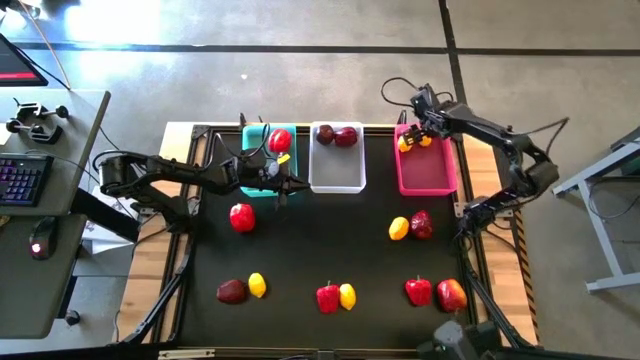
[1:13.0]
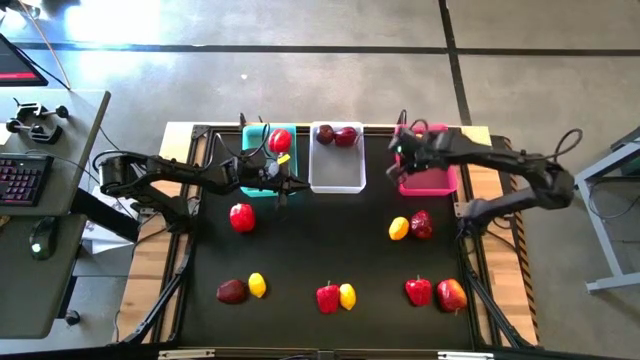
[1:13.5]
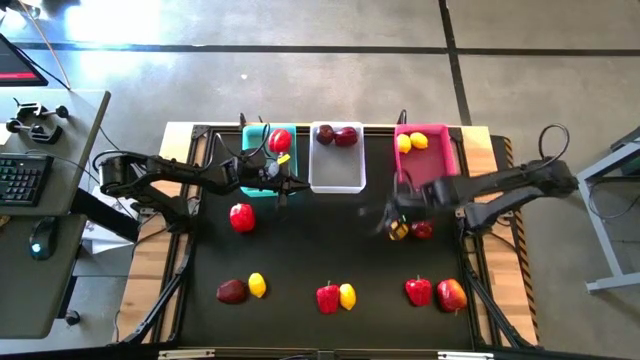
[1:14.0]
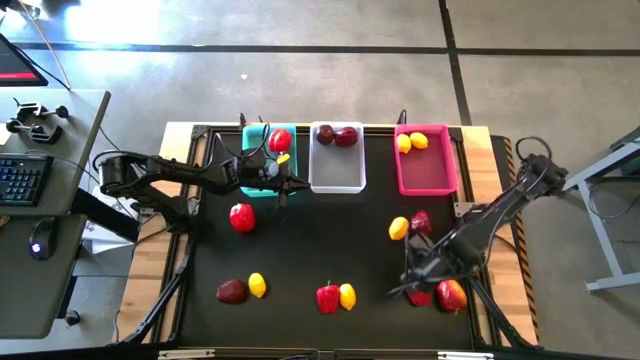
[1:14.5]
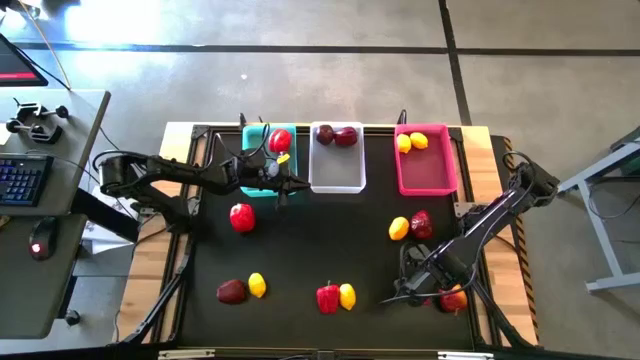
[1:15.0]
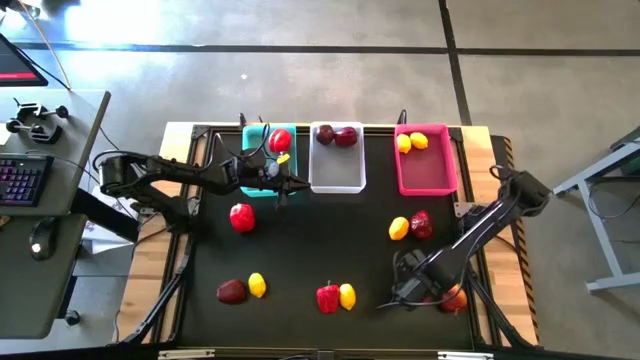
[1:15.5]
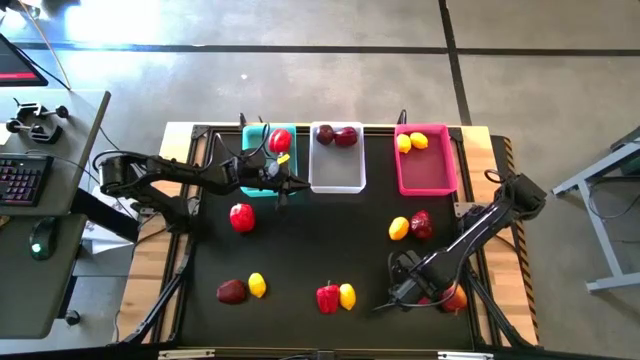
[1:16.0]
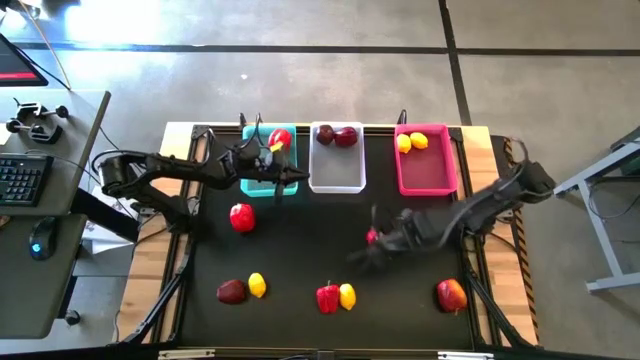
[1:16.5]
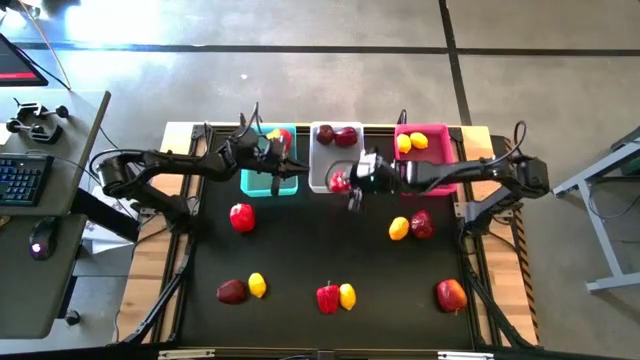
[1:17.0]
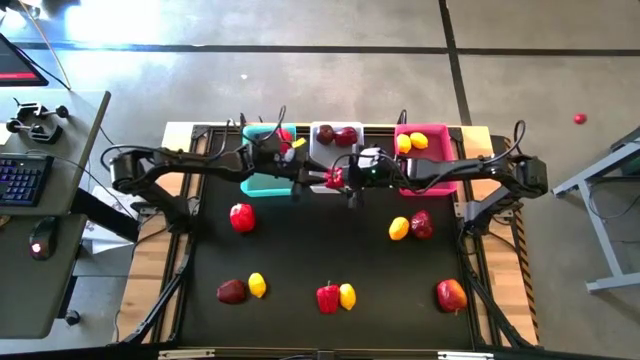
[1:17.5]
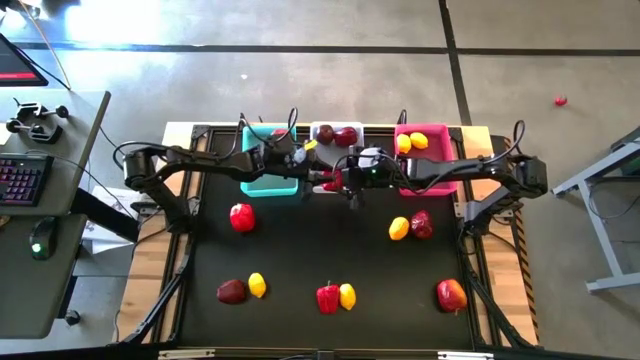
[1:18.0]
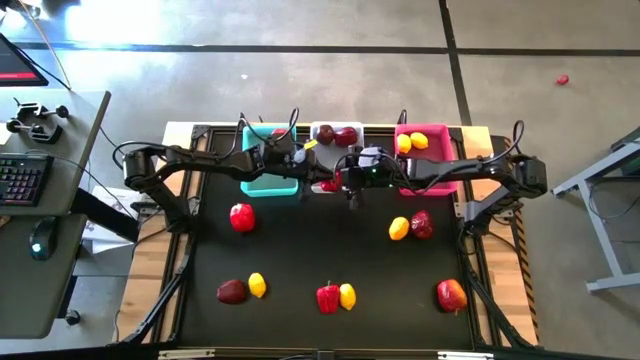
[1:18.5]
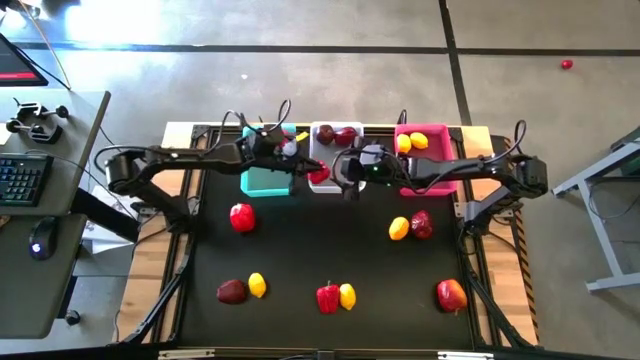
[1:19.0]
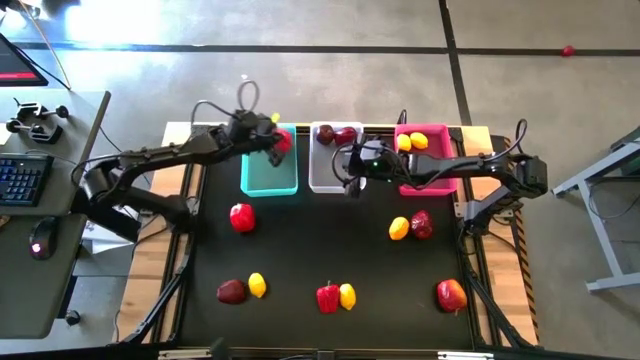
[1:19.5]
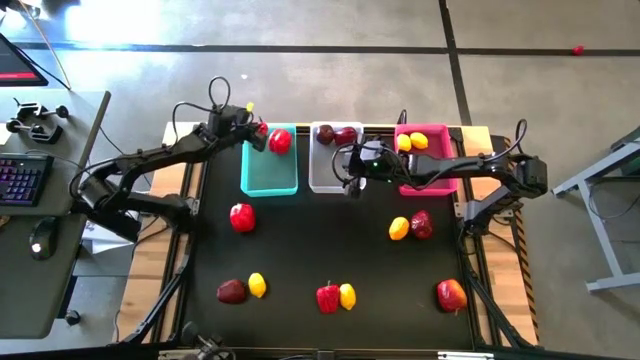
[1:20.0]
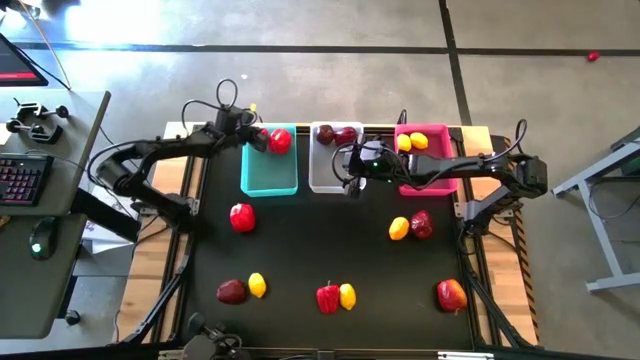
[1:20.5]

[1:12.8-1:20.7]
Task: Sort produce into baskets
Put the bell pepper into the green bin

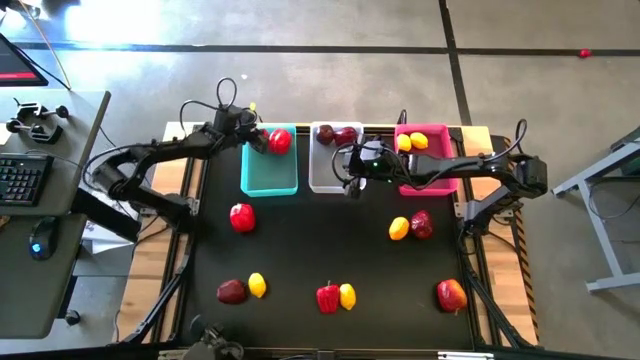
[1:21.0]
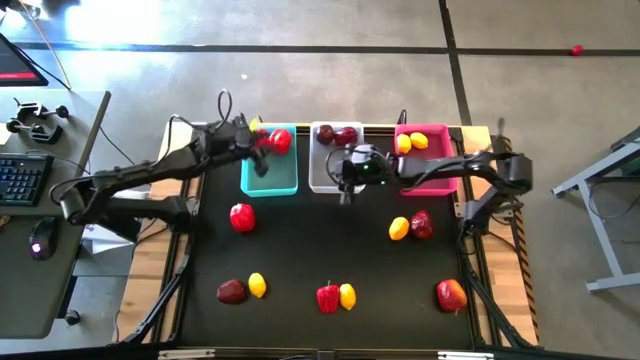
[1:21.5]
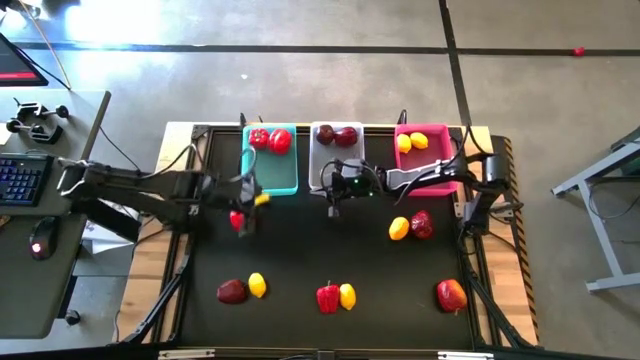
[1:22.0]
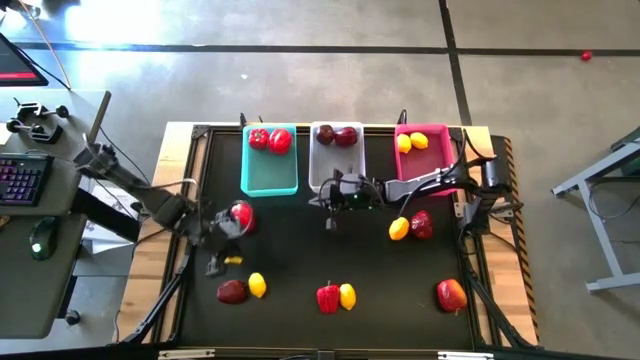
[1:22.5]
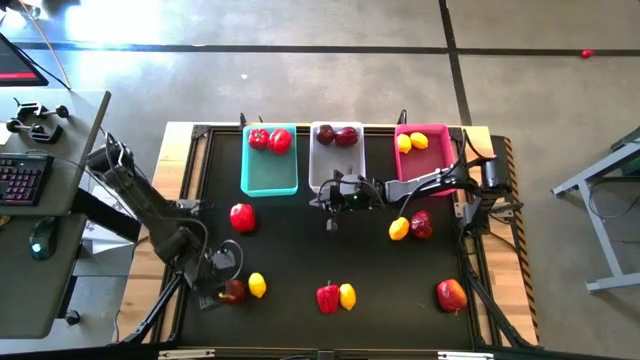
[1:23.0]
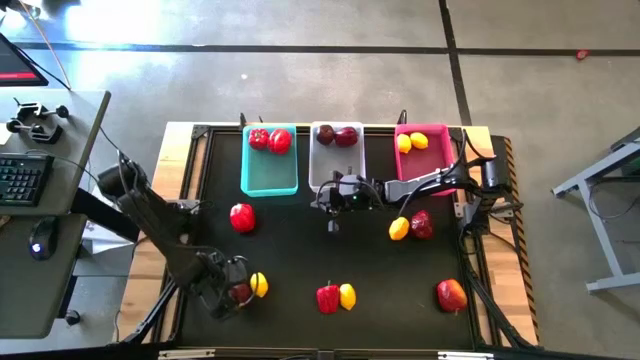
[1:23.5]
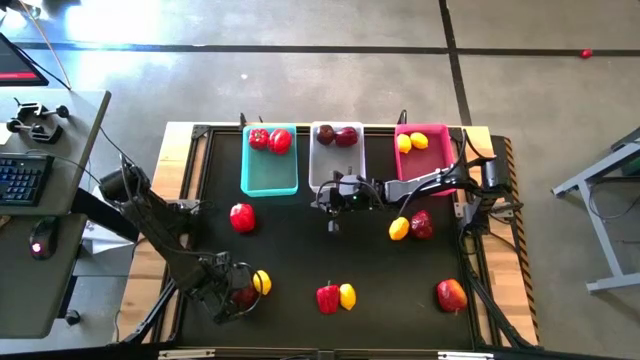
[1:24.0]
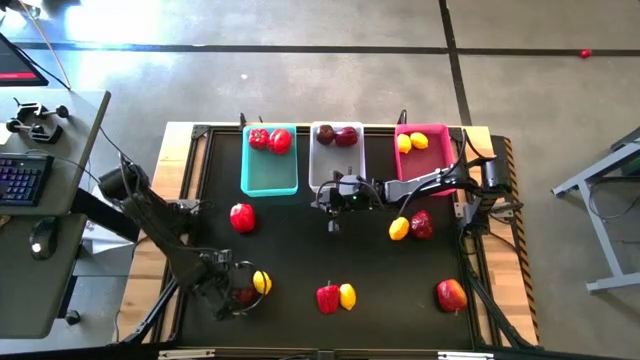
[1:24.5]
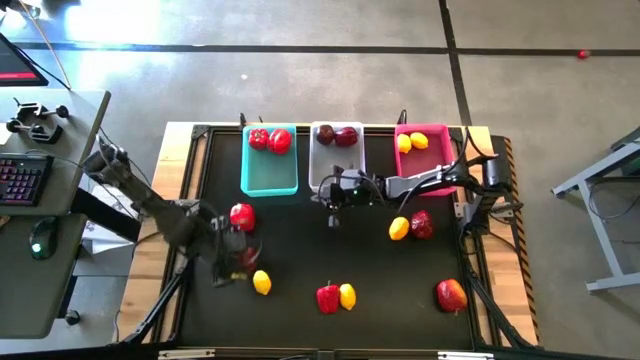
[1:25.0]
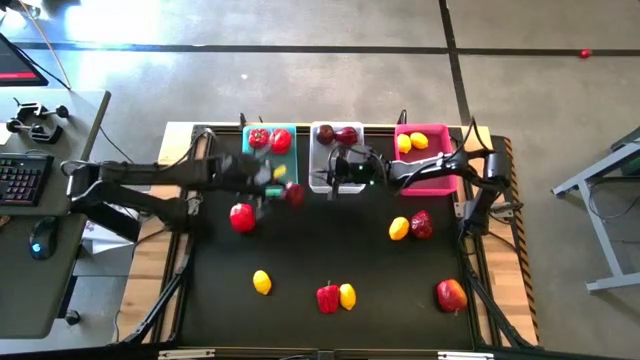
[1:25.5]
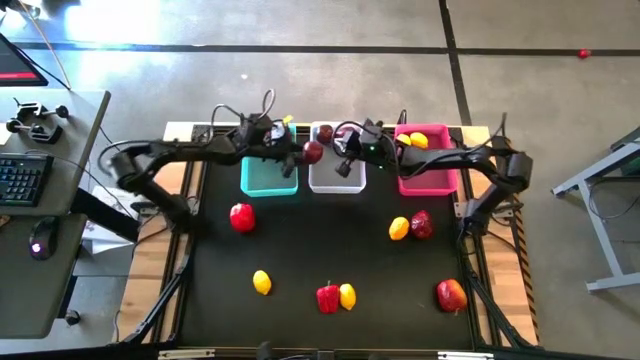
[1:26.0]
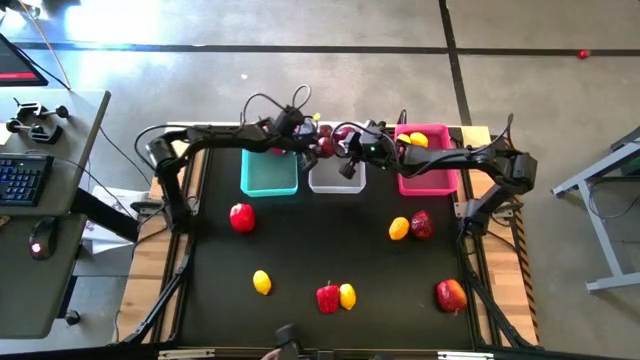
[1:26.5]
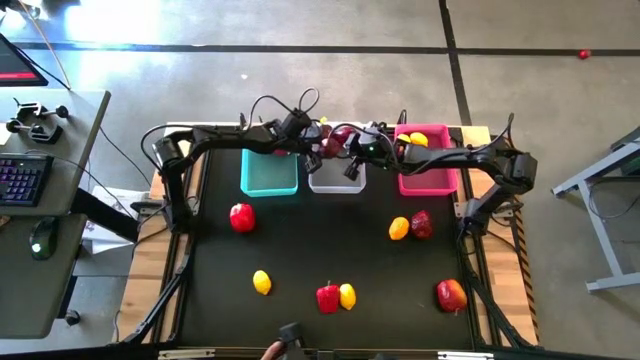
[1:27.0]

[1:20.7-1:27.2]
Put the apple into the white bin

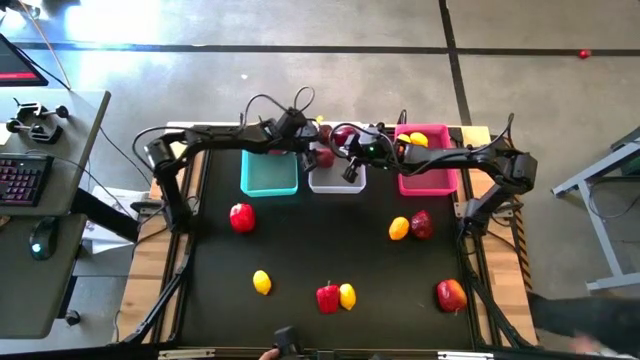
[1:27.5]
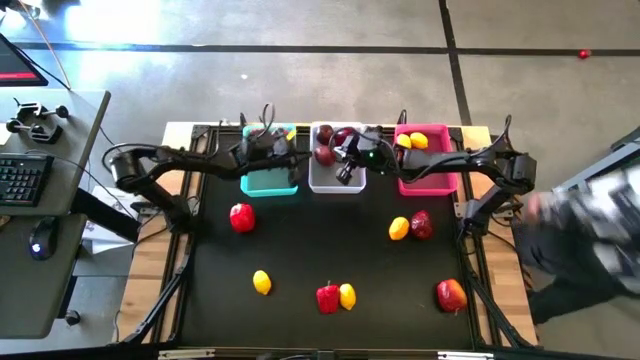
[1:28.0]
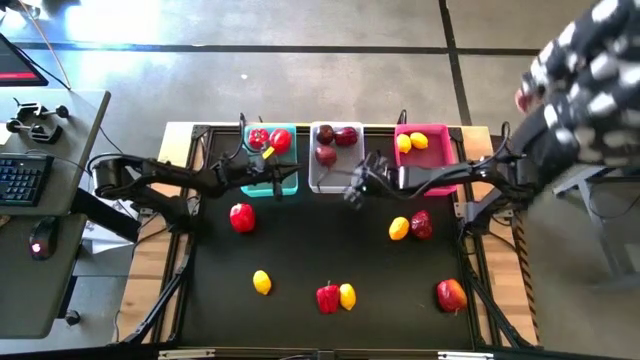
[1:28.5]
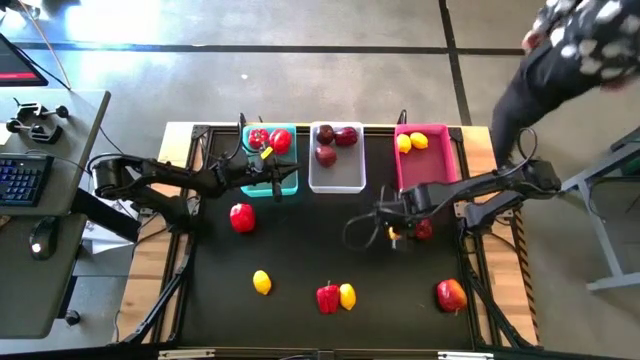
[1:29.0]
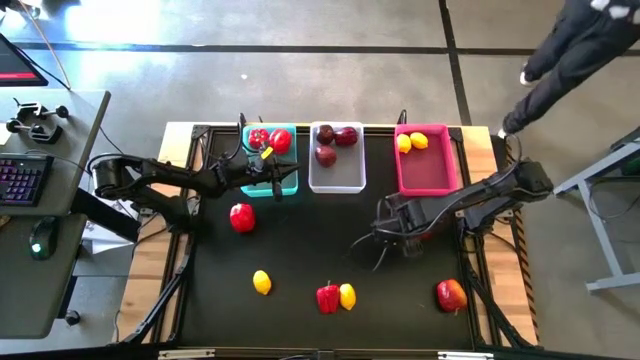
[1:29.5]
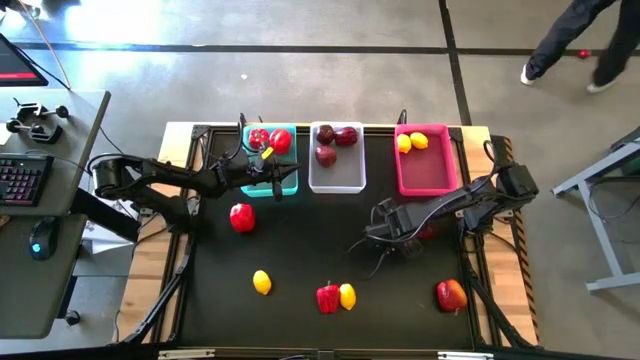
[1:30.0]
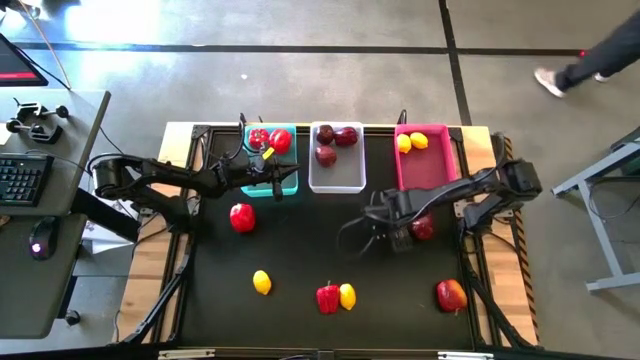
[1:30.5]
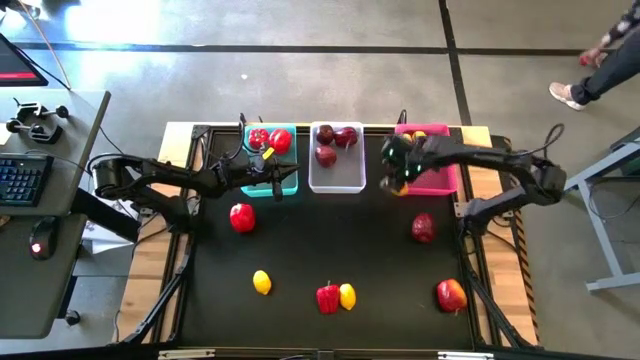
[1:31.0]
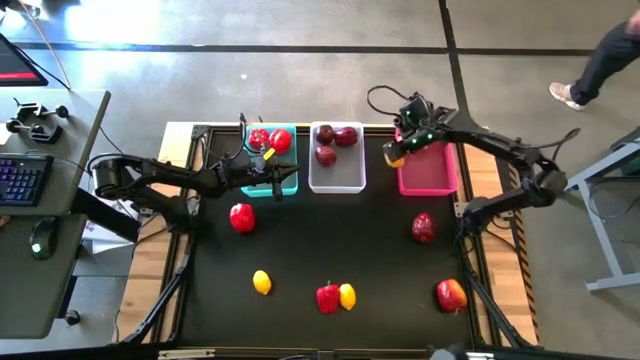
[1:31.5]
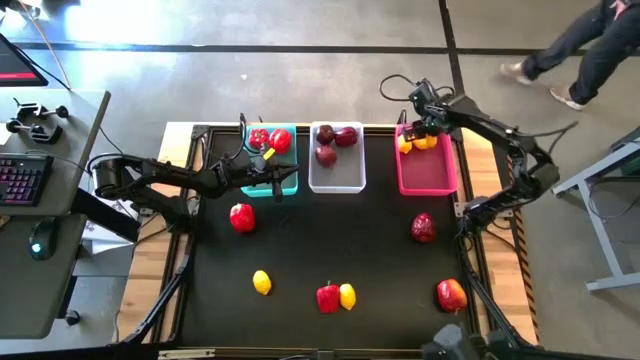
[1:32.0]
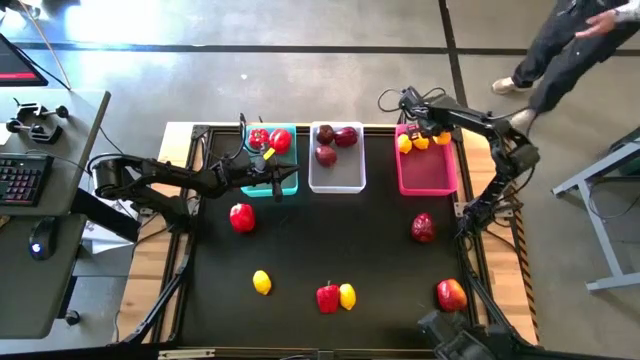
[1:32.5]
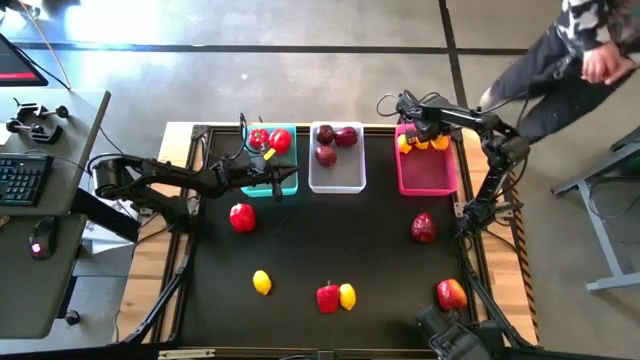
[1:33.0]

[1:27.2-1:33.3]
Put the lemon into the pink bin

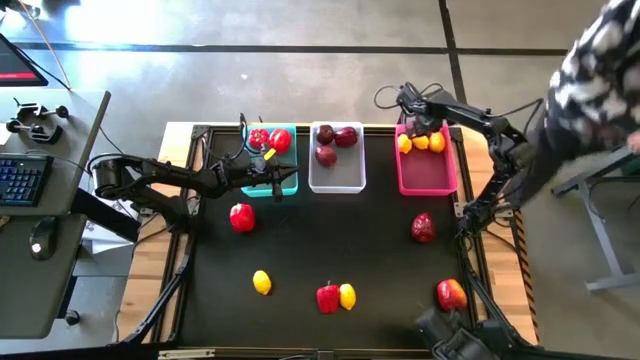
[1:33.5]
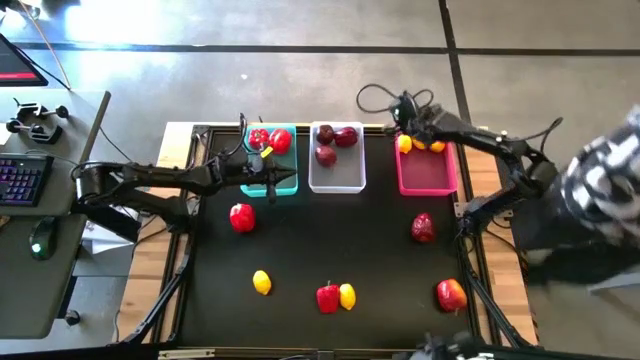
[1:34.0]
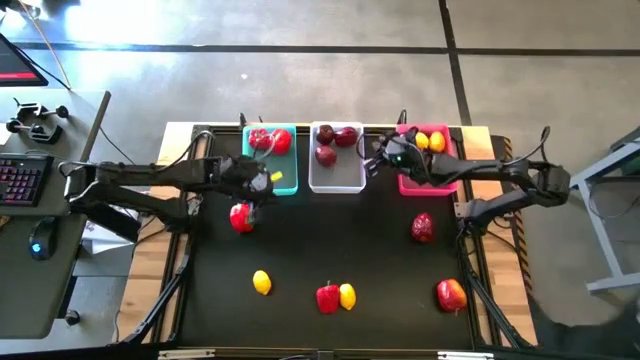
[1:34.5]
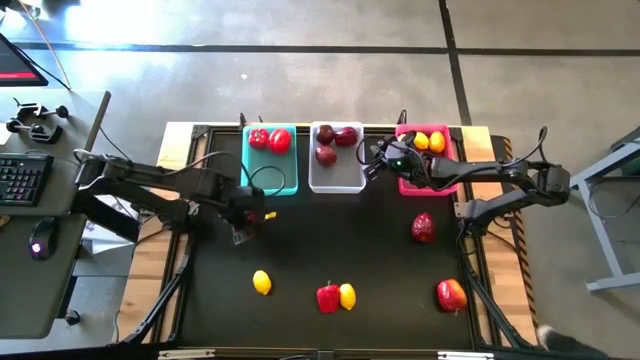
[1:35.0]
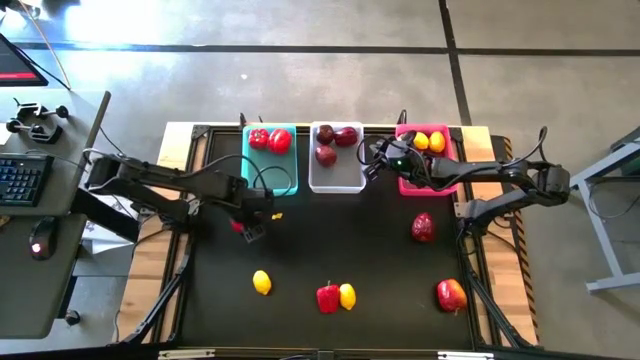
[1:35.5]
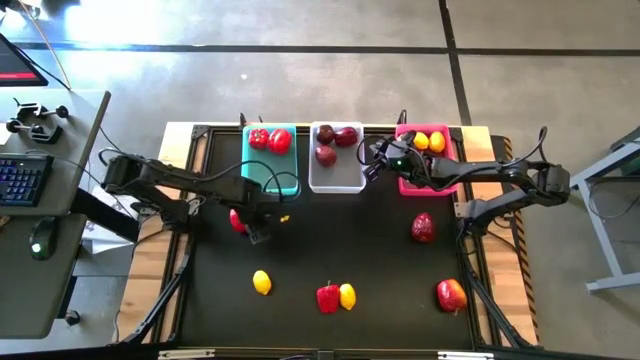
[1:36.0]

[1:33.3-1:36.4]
Put the bell pepper into the green bin
